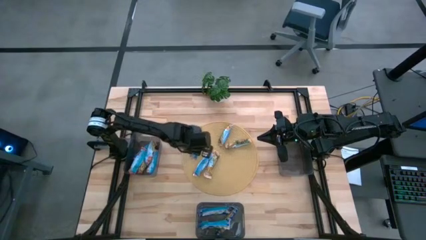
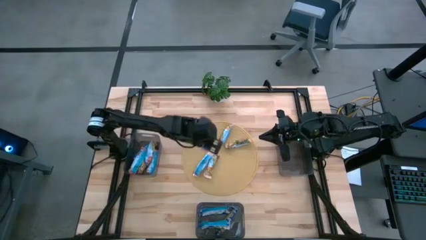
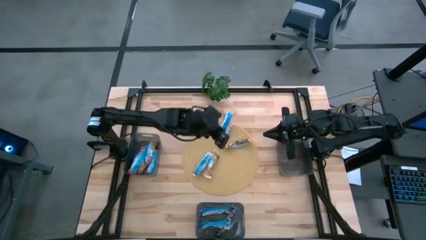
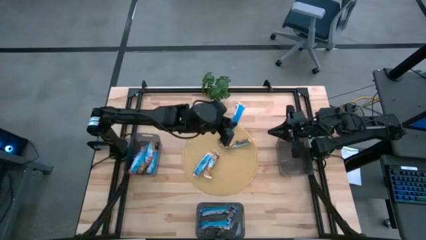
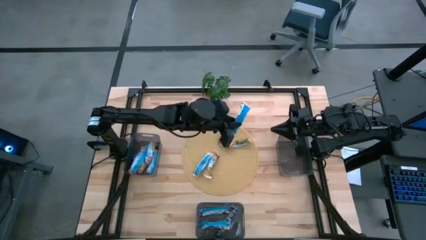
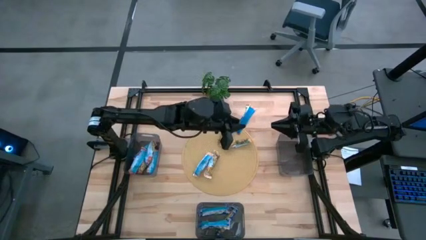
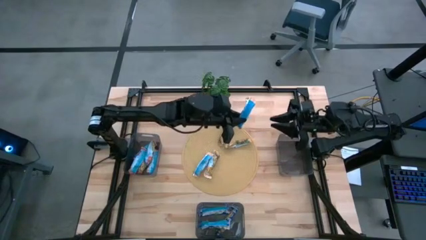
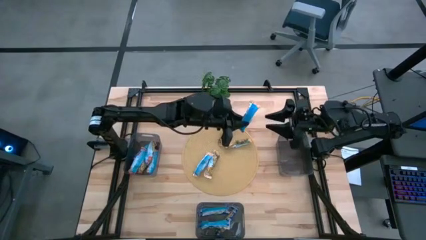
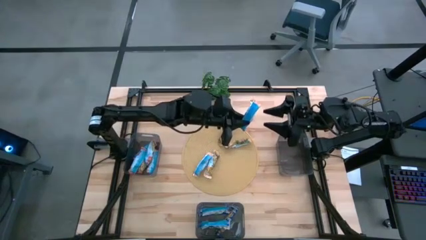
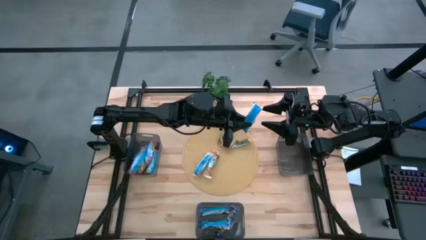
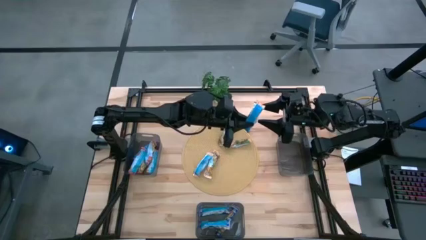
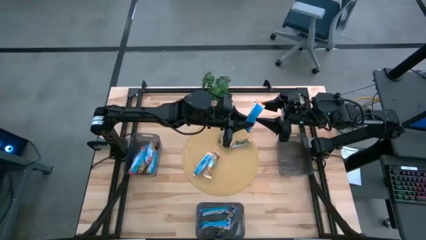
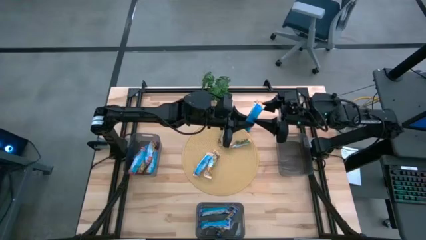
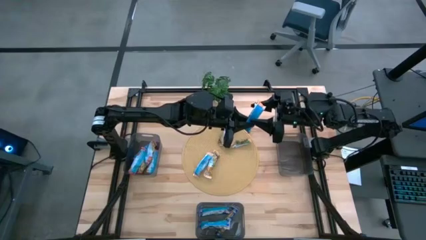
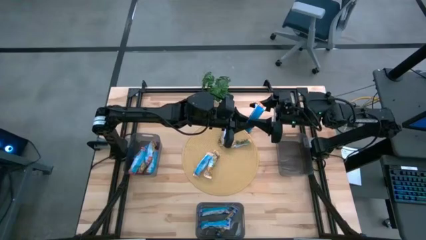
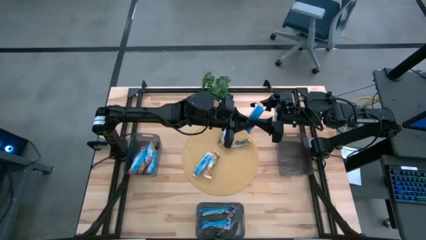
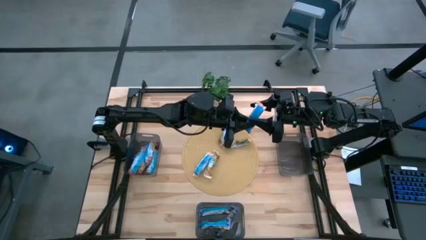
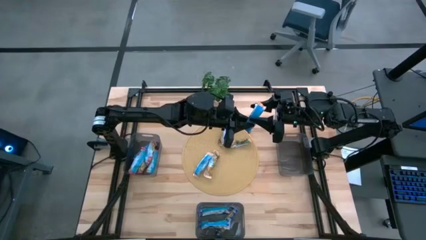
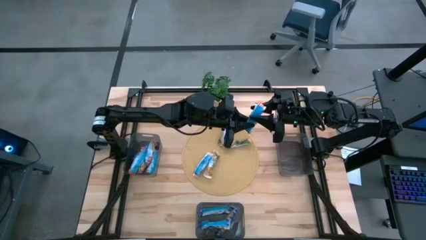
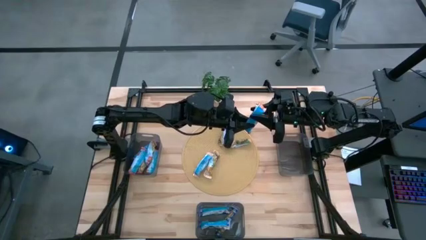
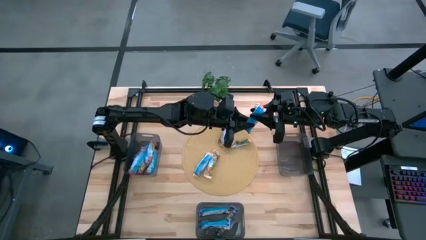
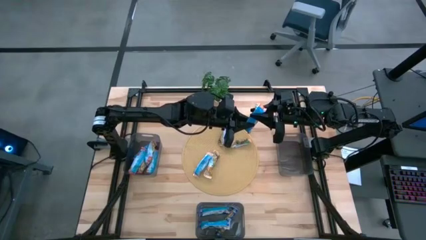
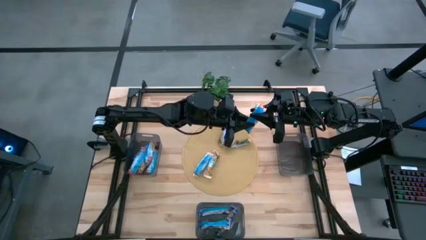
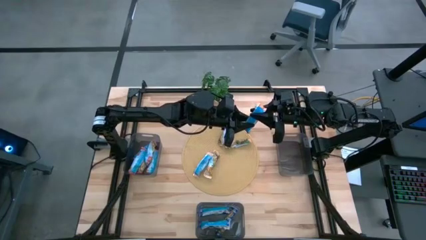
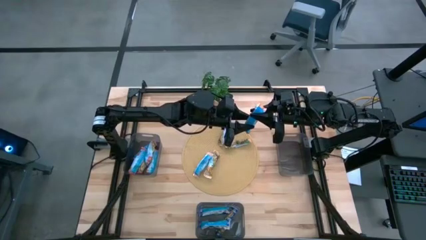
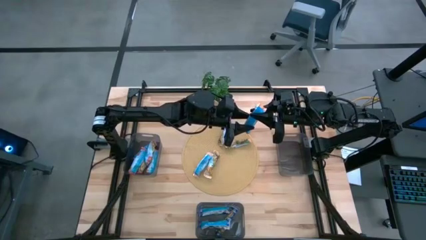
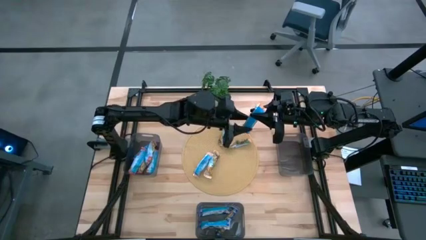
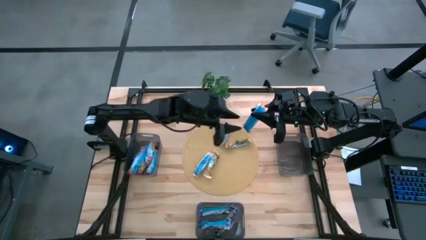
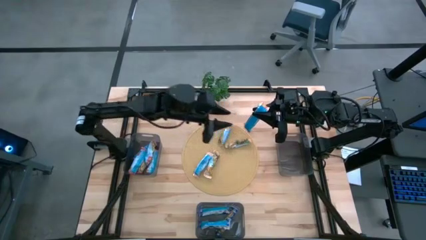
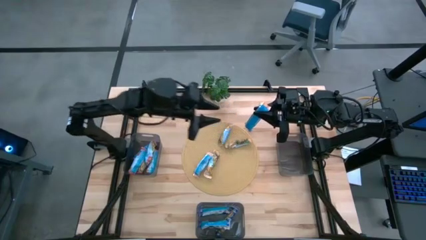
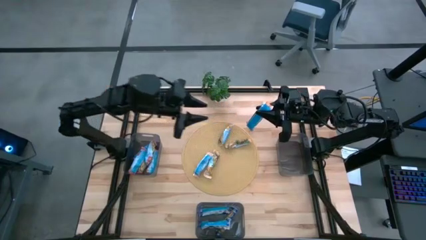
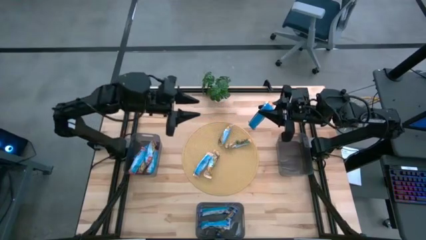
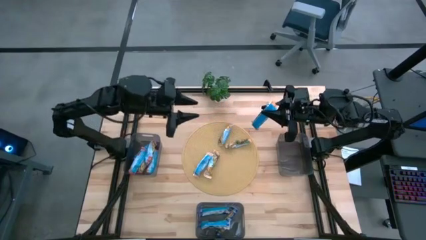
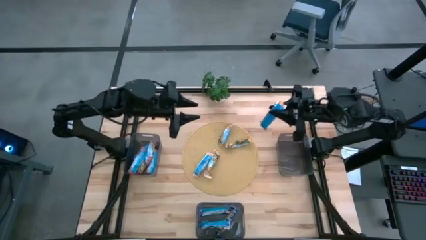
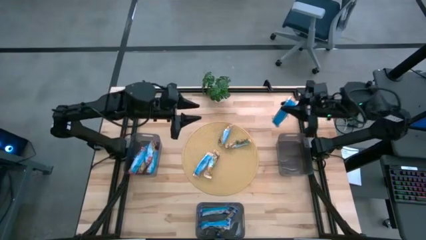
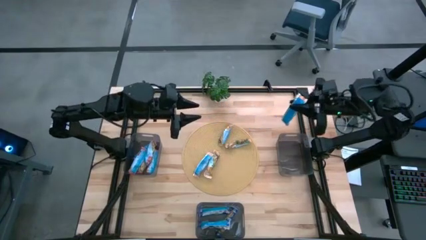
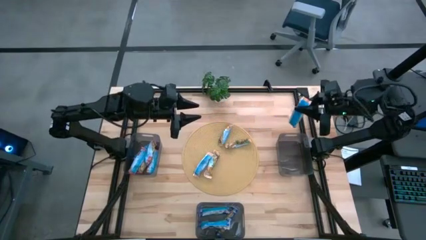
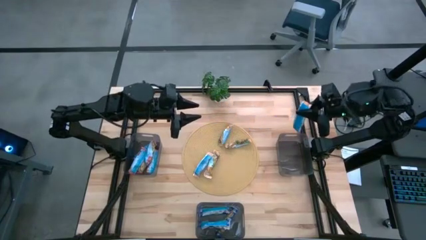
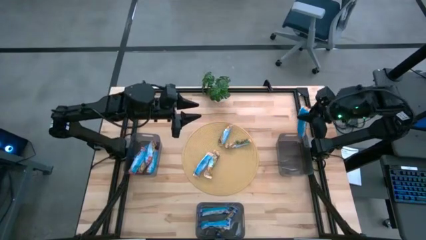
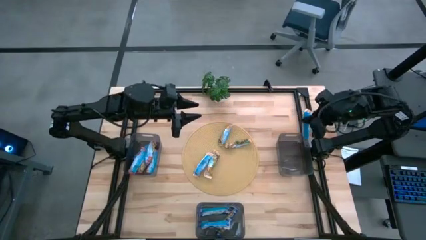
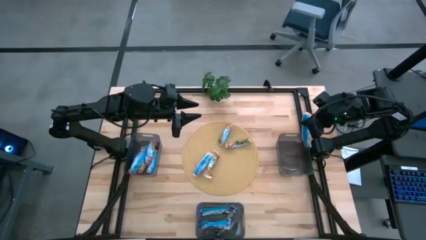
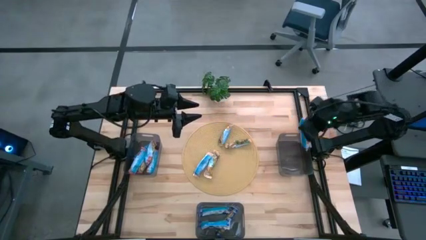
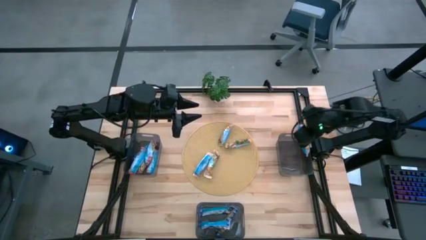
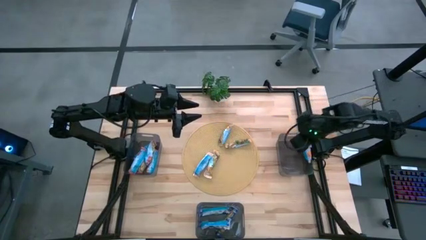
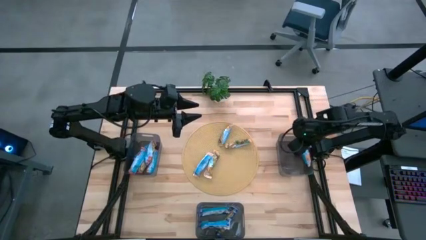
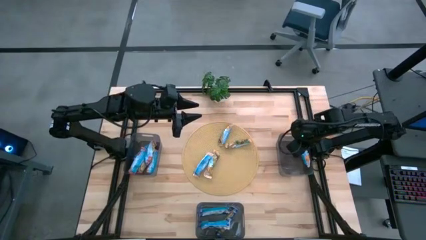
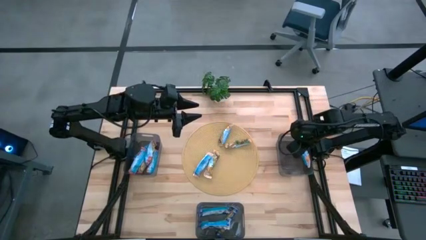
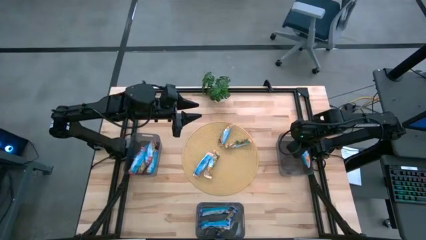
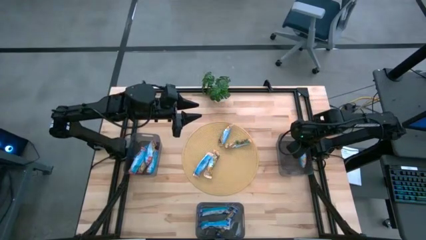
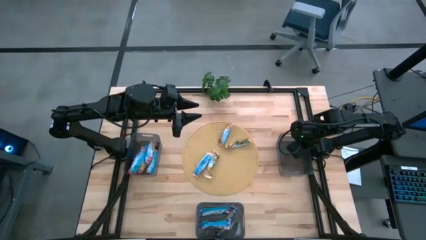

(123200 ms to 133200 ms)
Task: Pick and place Granola Bars by type
Put the yellow granola bar into the top right bin

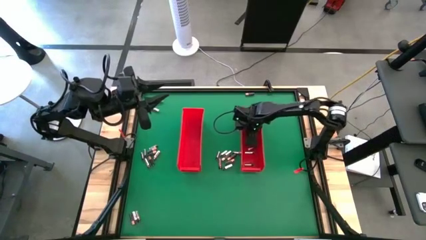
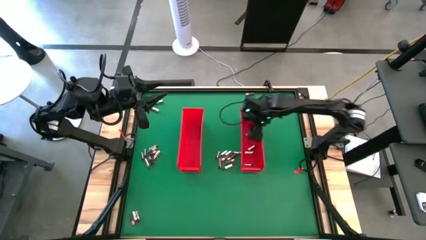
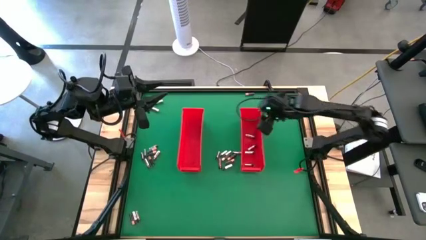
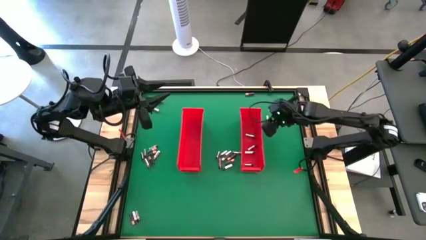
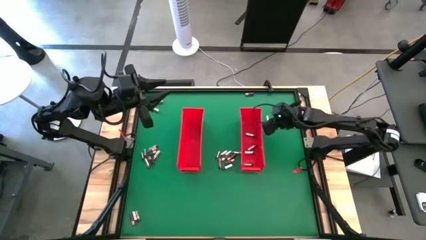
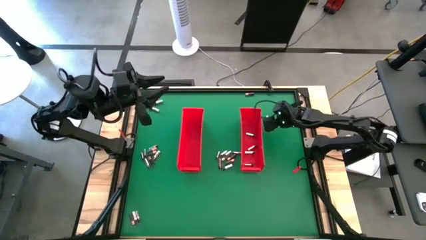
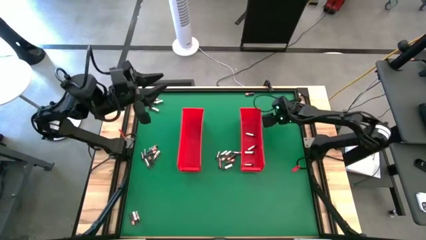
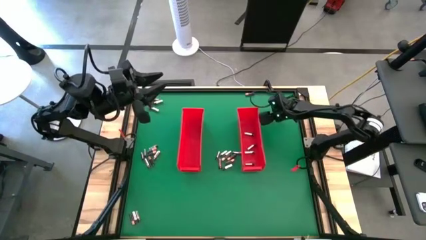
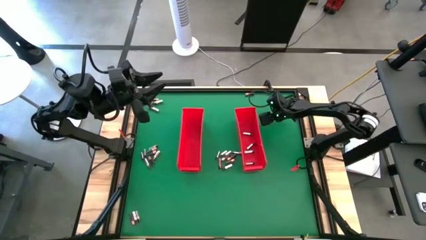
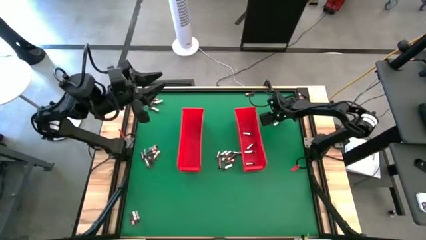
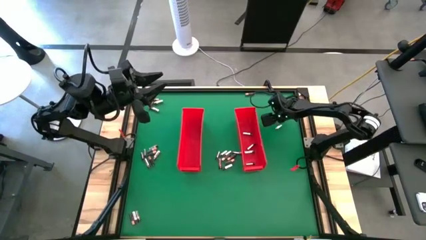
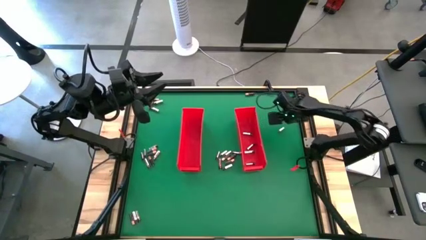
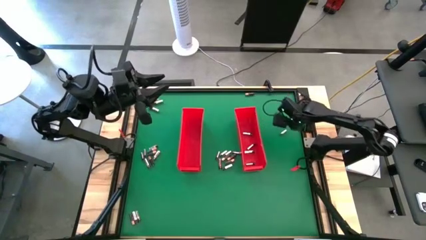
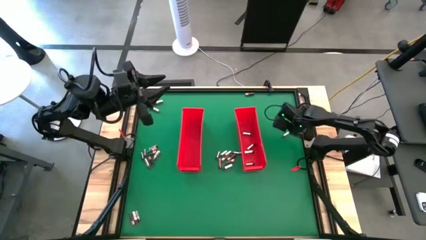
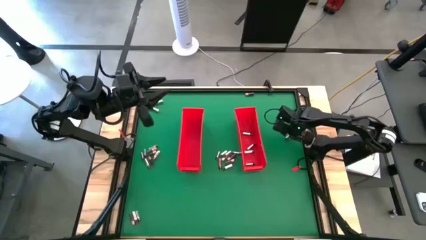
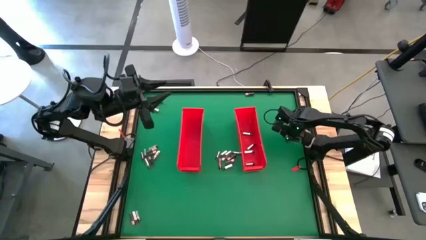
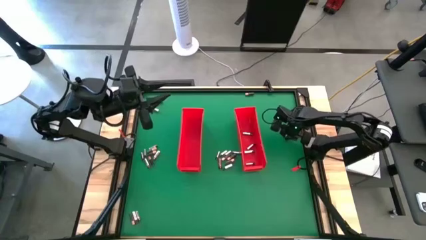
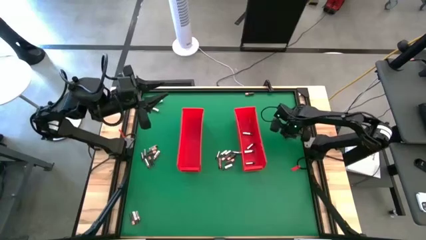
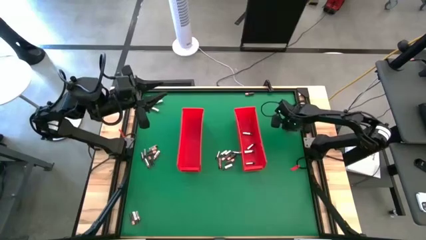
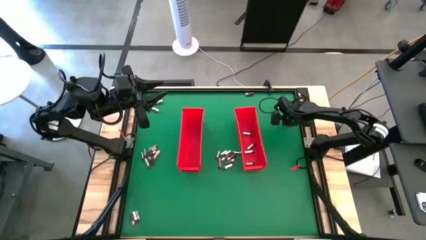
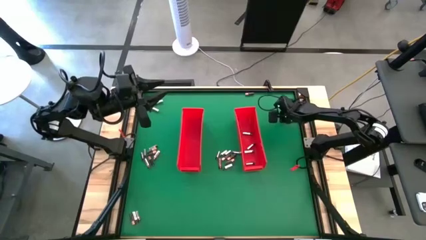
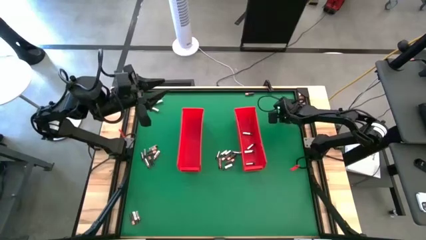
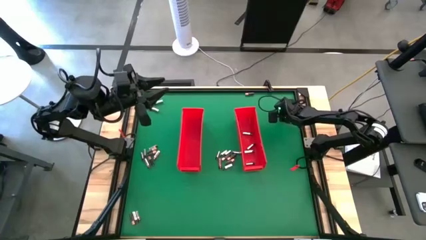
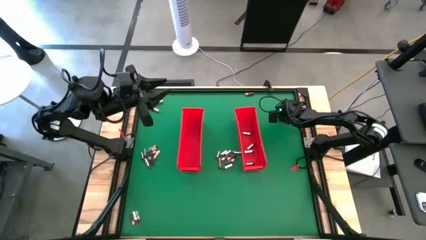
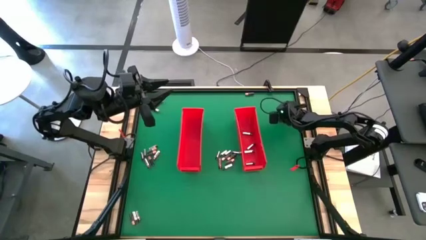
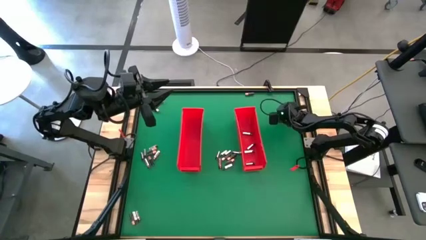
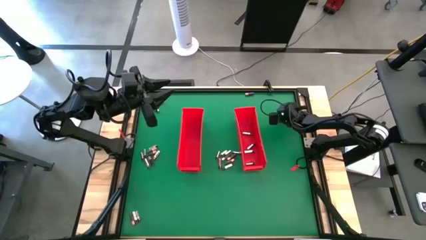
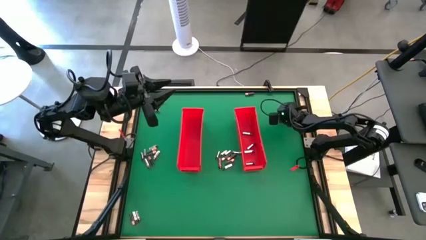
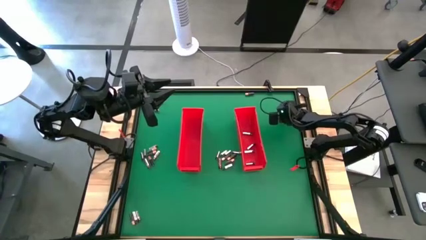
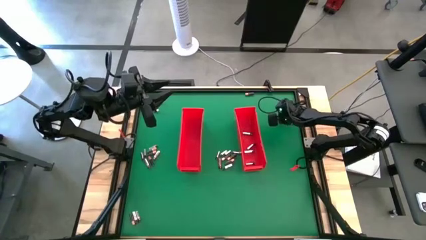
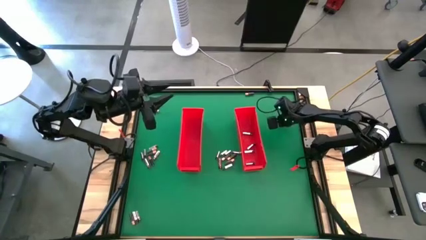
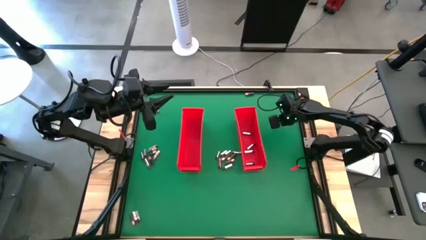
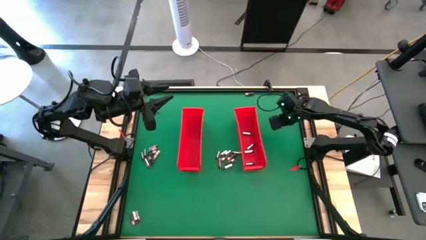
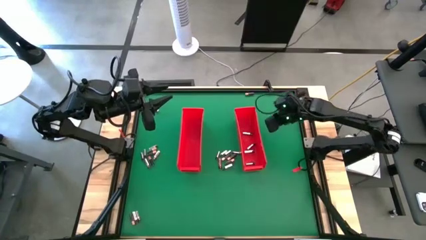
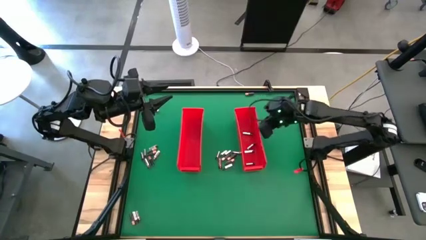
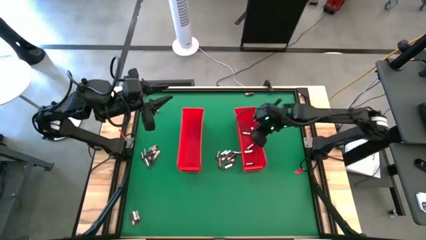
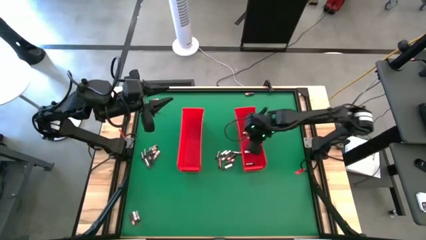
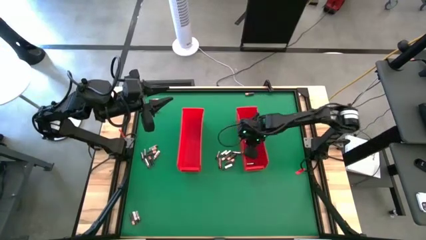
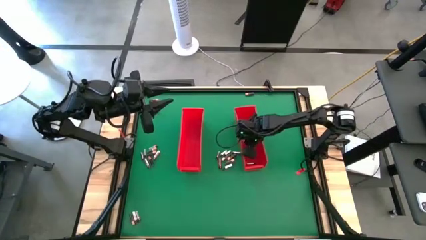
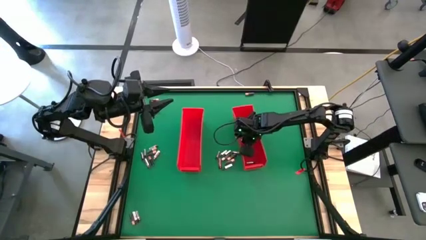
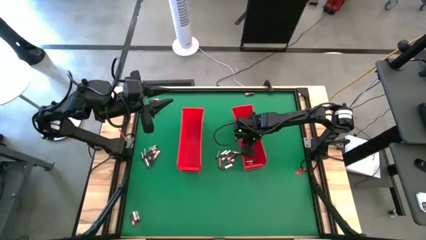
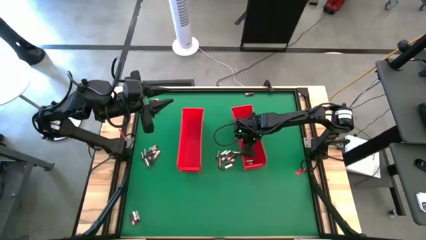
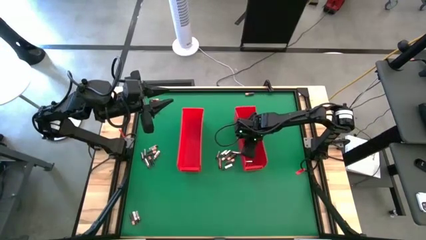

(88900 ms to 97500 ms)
Task: Sort batteries
Put the silver battery into the right red bin
